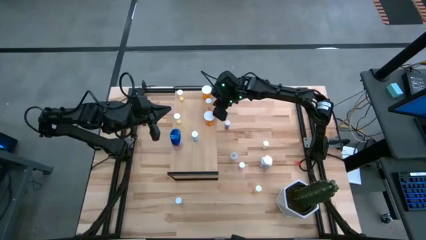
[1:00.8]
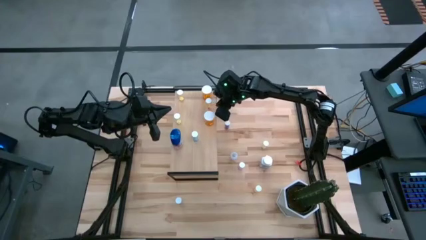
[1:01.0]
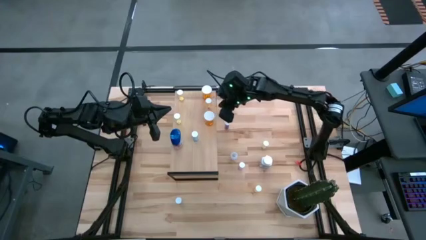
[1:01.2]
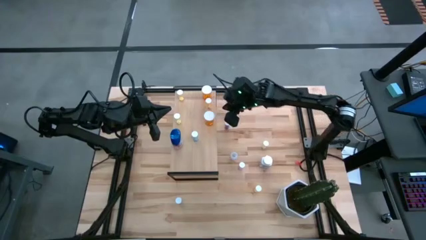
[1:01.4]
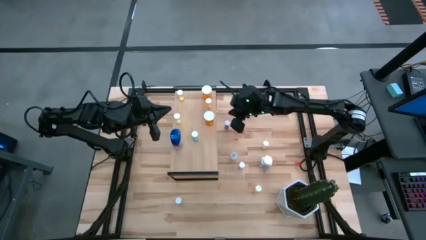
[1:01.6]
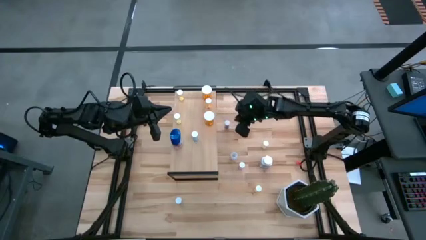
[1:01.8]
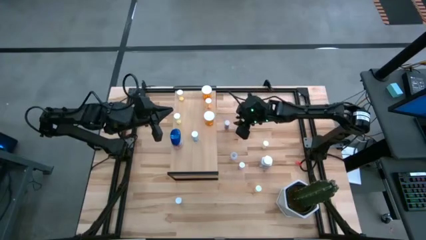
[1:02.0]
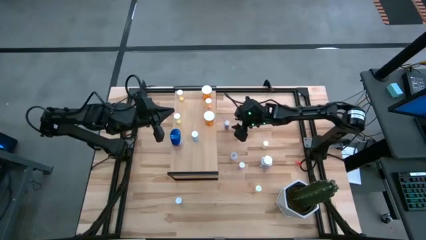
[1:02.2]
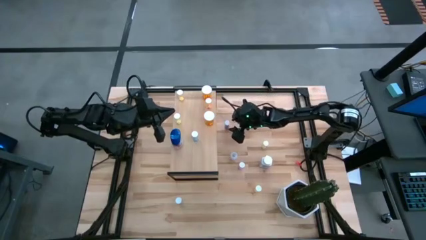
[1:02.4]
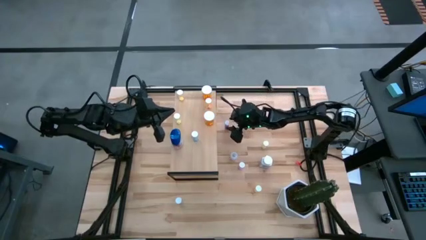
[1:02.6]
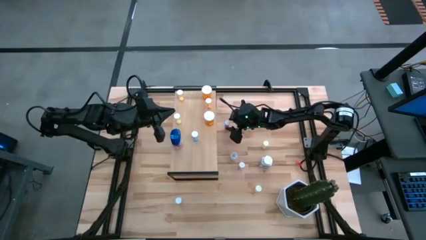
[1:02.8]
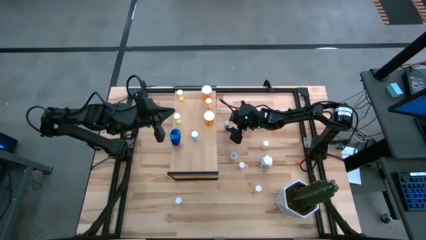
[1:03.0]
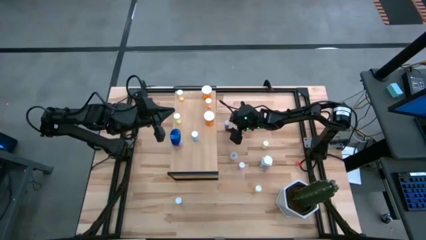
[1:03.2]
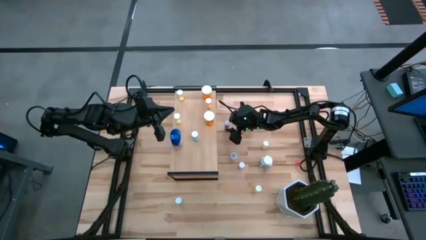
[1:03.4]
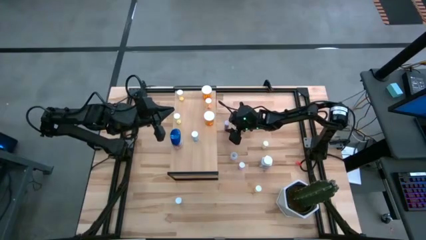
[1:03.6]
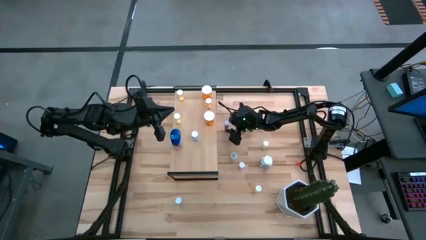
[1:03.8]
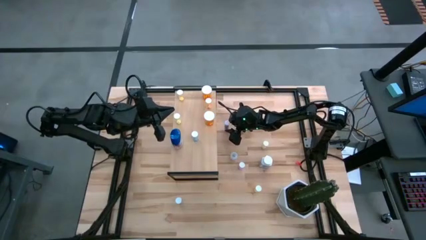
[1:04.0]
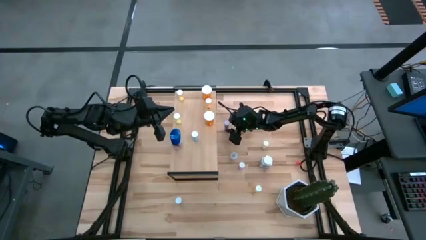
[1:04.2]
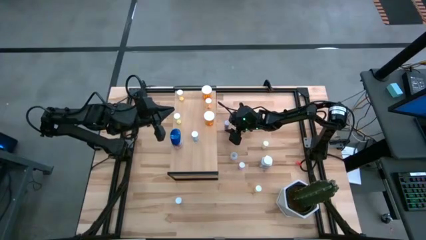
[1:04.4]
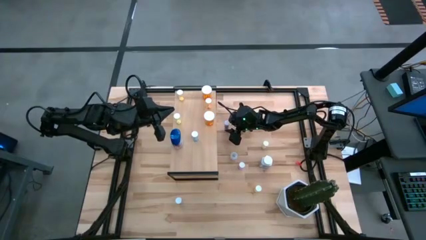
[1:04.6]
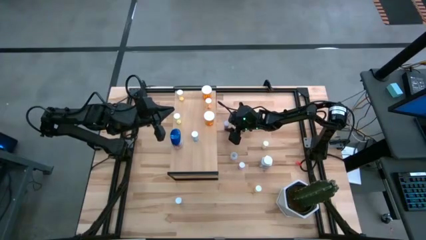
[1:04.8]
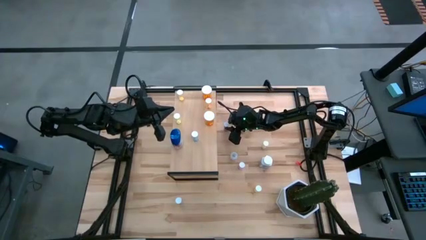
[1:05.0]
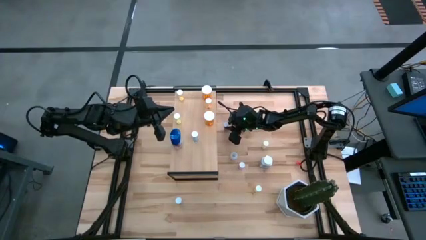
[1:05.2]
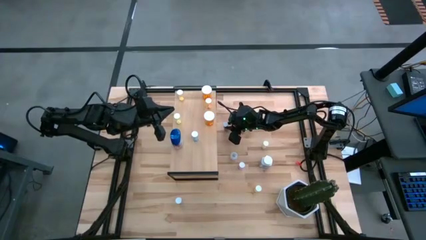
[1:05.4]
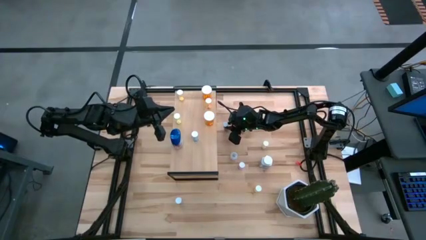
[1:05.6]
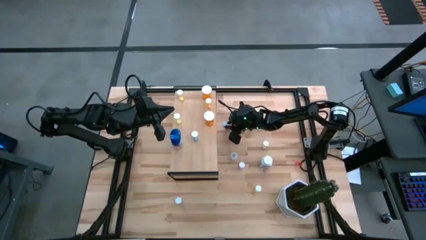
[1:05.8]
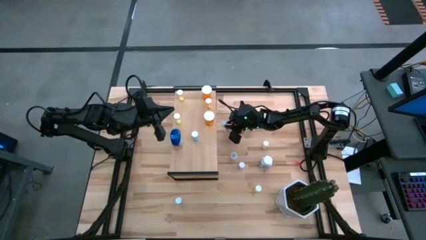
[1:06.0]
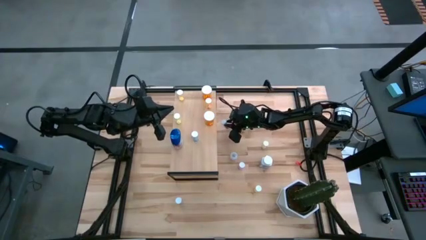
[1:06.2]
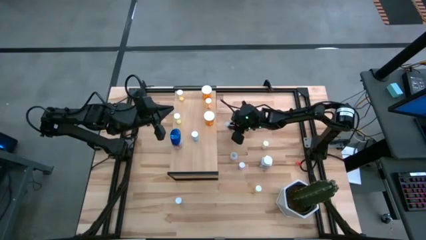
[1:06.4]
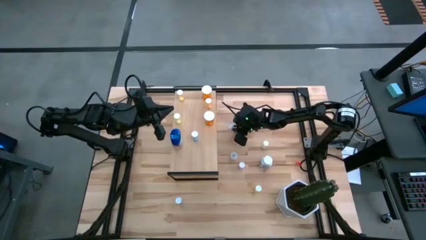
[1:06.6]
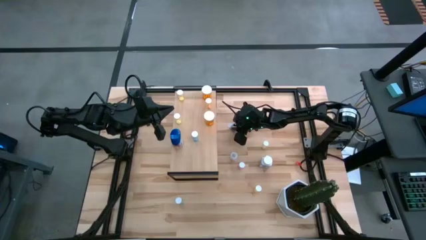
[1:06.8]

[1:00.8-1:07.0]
Task: Pick and place medicine bottles onto shelf by color
Put the top blue capsule bottle on the shelf

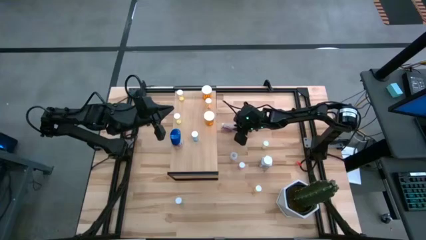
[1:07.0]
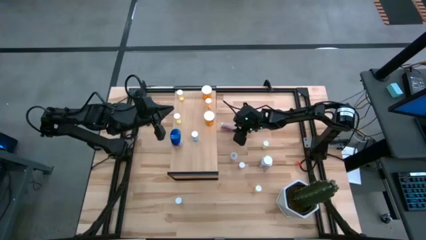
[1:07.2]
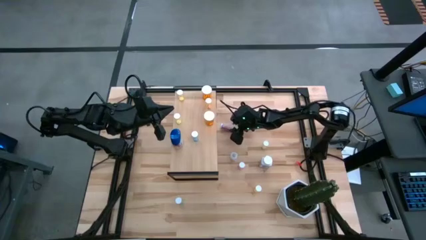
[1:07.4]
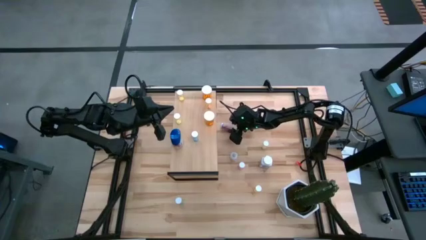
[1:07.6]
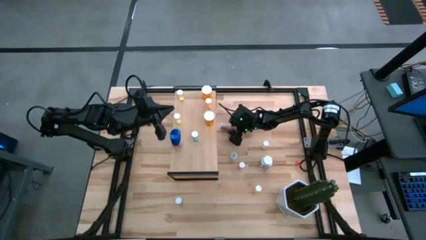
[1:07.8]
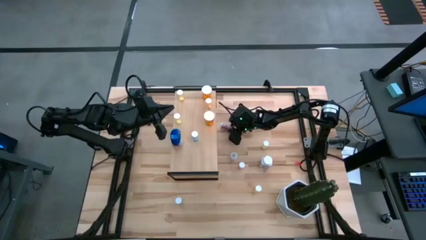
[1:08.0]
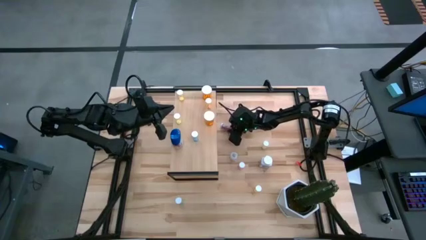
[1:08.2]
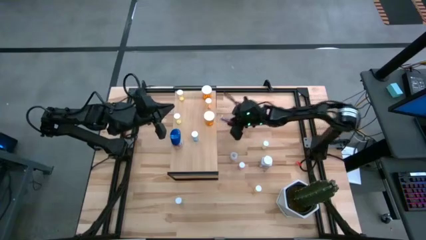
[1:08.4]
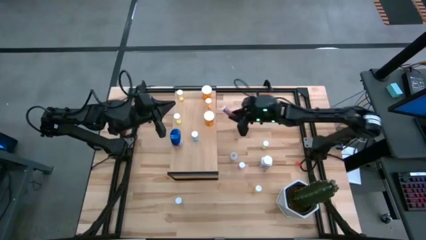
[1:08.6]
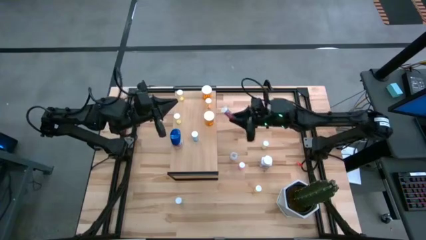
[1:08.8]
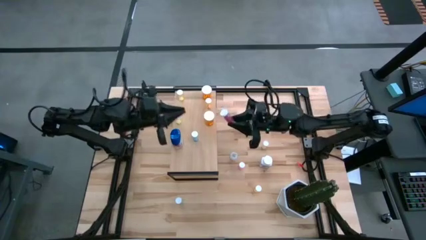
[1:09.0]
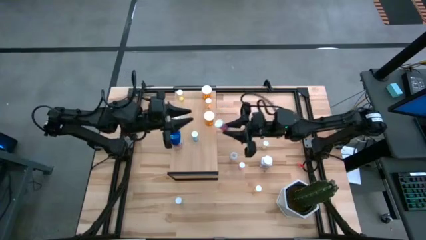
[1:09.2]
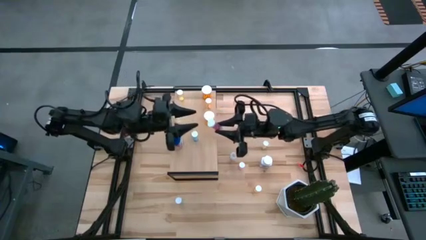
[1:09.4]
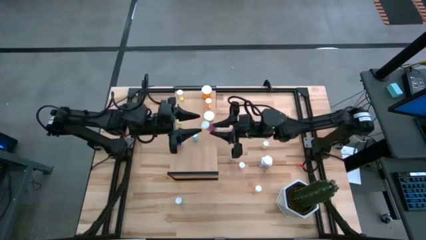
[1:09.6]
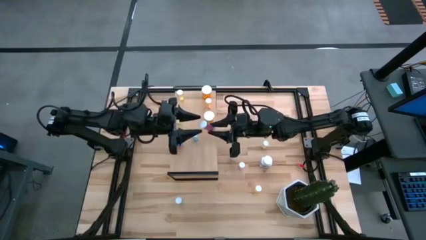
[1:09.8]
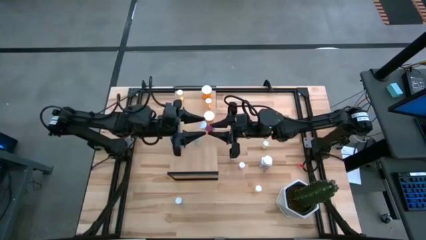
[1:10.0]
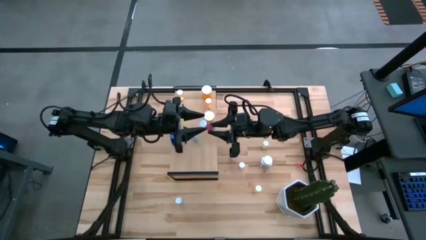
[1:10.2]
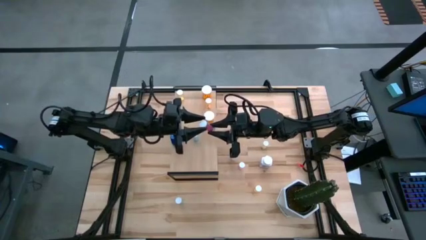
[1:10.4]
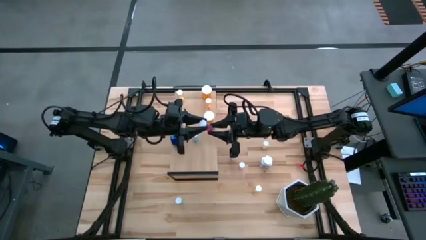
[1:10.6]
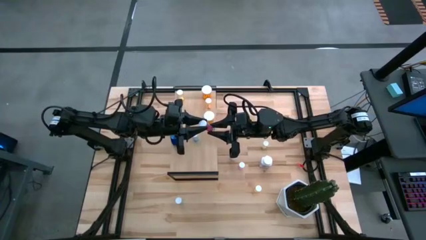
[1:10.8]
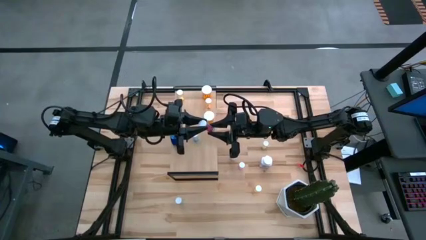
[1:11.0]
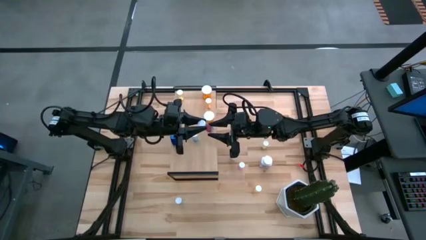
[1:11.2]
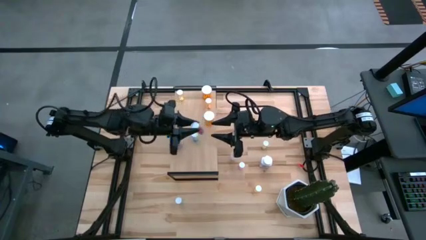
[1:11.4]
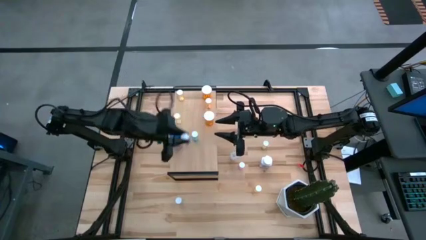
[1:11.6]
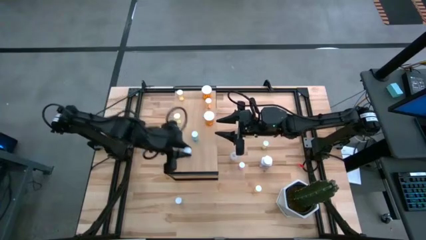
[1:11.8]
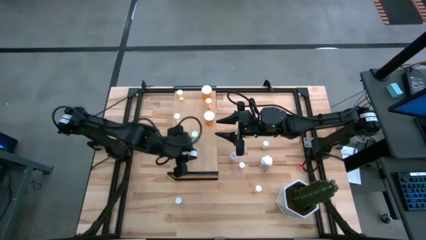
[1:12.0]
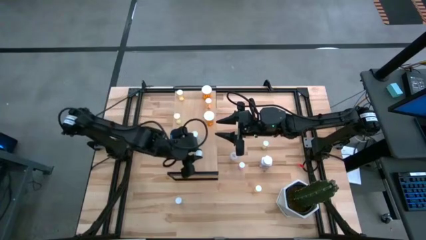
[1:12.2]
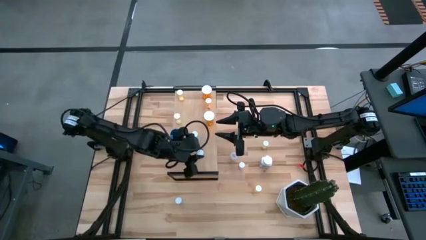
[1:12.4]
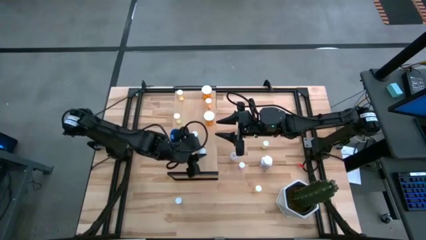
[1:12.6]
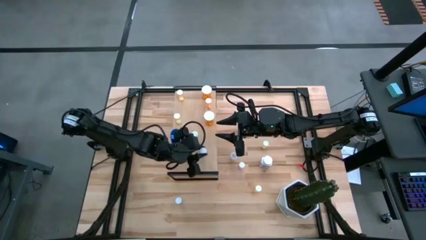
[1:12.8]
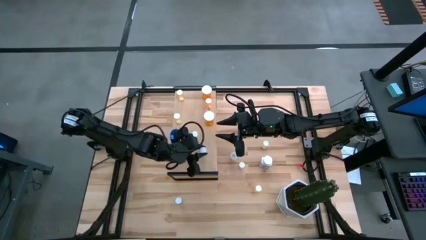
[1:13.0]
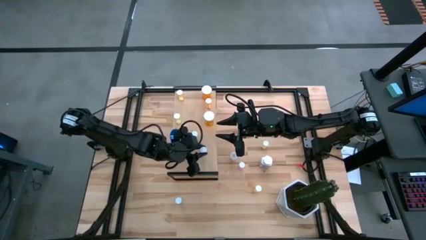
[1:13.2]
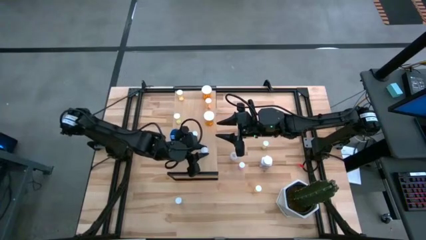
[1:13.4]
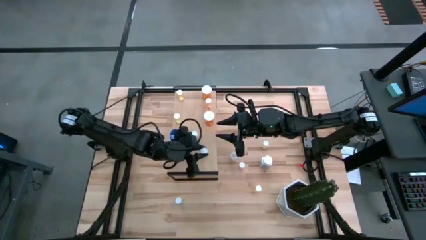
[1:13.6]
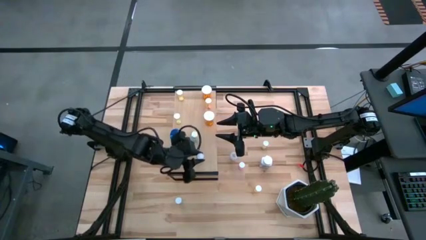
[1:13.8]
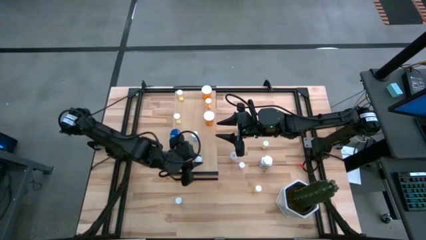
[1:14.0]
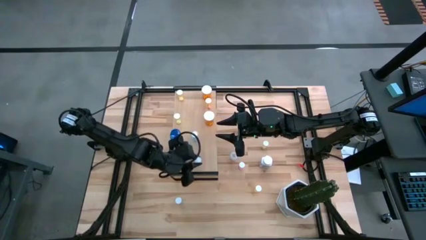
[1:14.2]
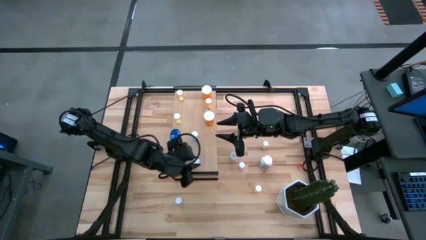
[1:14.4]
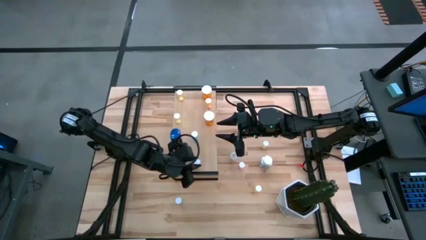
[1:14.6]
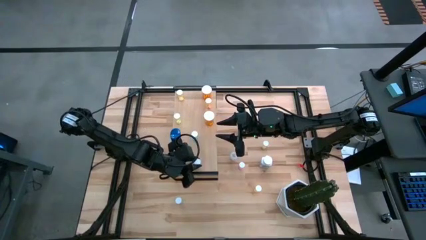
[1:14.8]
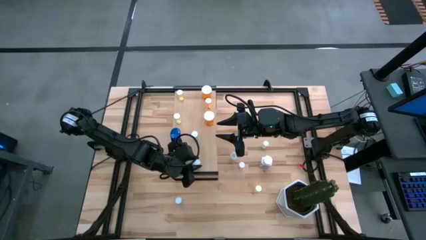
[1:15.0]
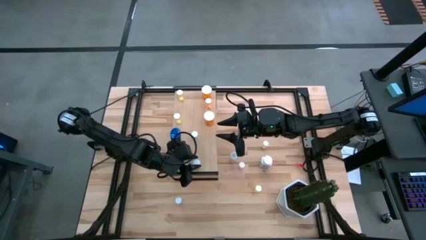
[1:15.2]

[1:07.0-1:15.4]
Put the top blue capsule bottle on the shelf

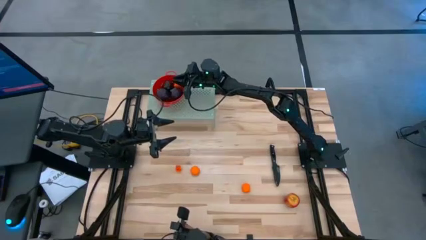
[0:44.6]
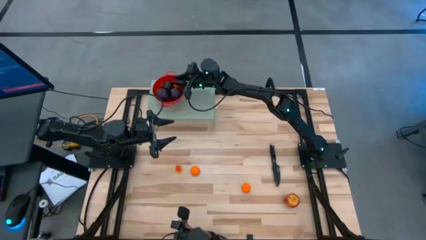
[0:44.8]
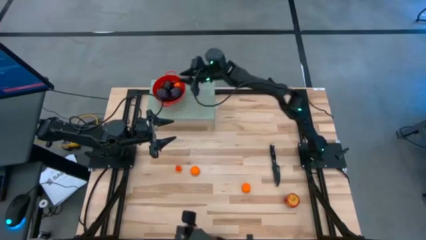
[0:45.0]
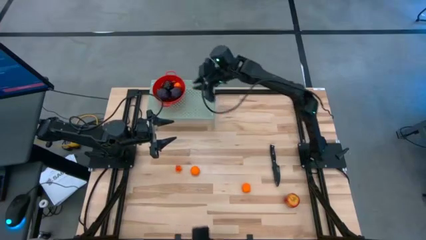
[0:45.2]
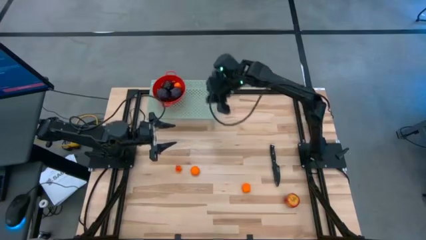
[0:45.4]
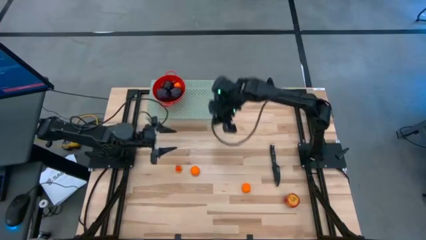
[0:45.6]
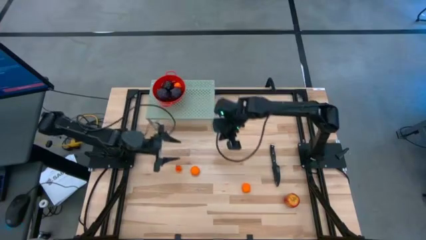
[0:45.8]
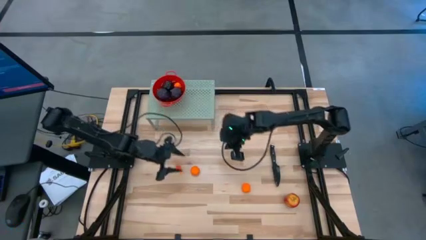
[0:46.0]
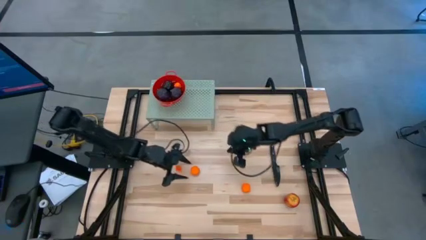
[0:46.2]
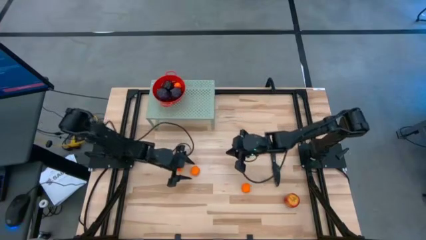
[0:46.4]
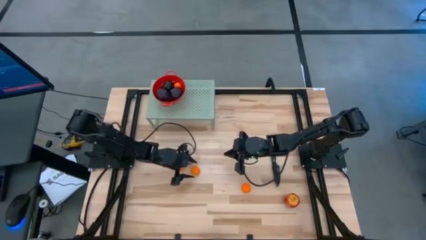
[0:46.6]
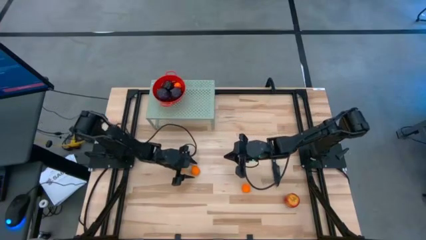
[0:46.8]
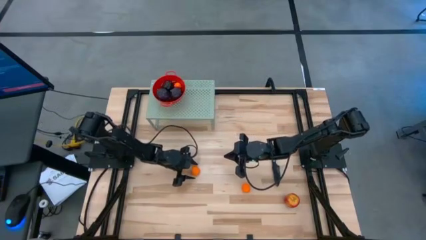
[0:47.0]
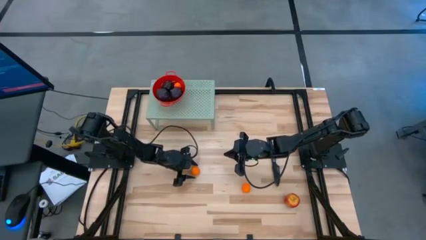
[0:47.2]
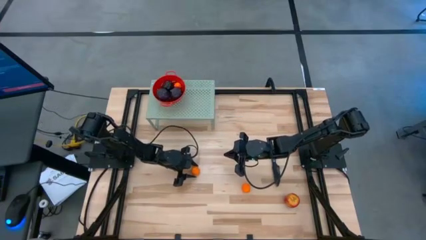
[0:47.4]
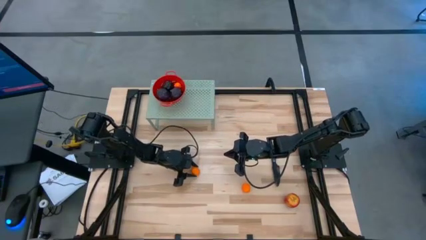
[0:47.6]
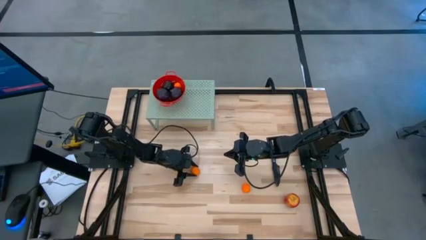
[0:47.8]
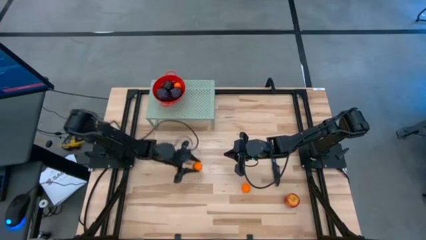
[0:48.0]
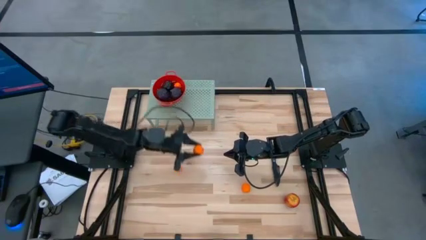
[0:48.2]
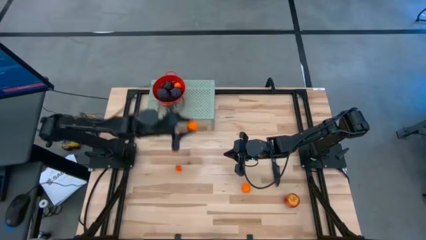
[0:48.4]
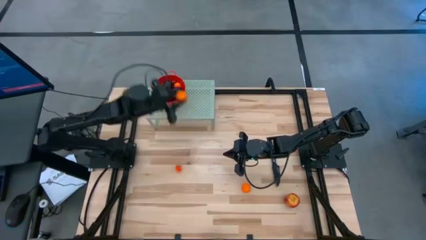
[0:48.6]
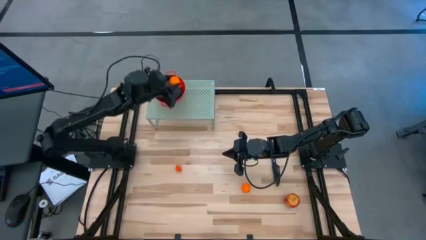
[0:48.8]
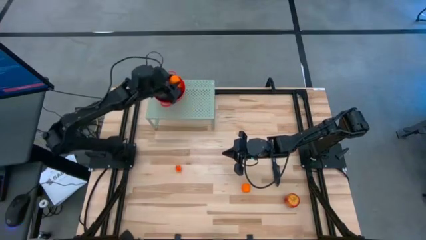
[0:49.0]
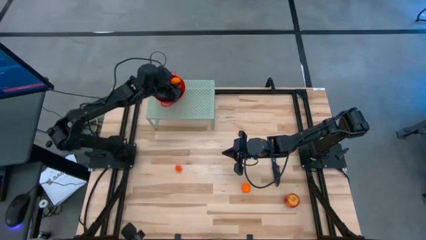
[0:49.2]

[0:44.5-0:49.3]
Task: Pick & Place Fruit
Put the left orange fruit into the red strainer bowl
